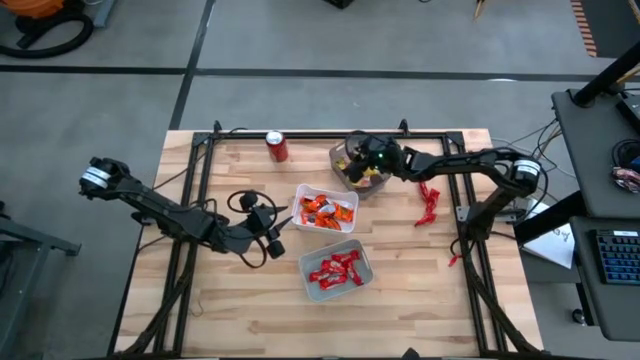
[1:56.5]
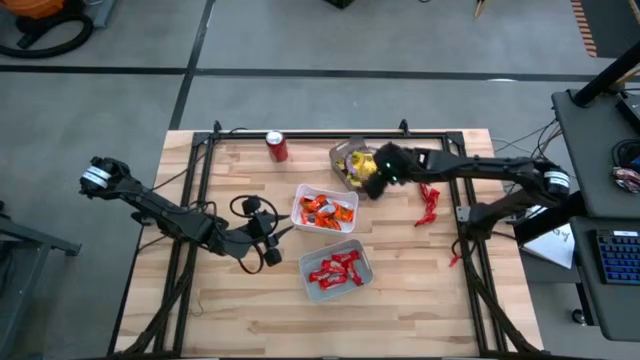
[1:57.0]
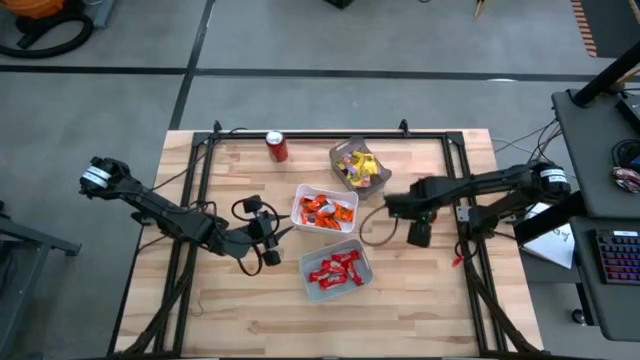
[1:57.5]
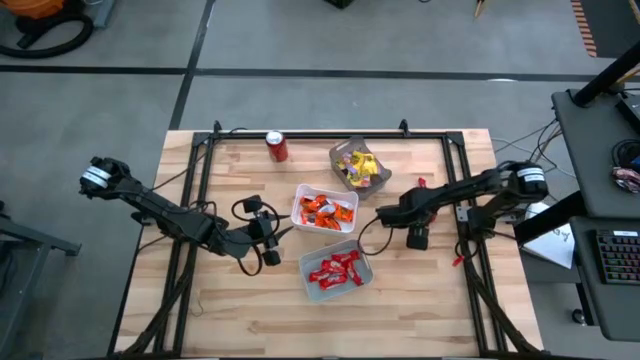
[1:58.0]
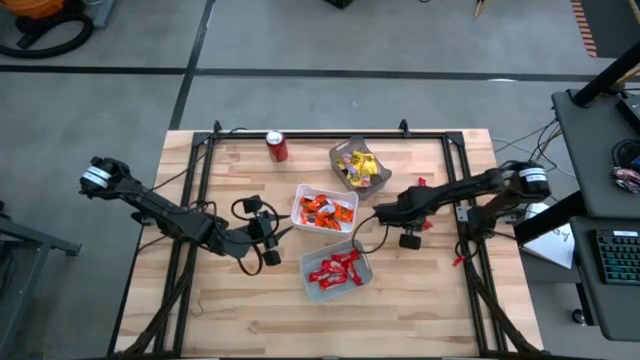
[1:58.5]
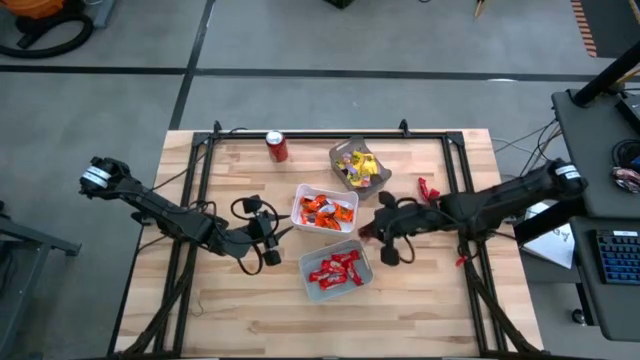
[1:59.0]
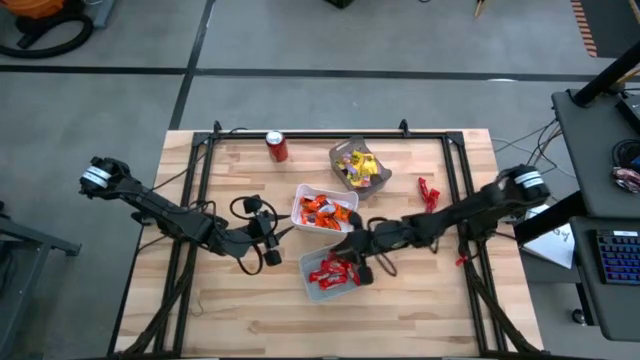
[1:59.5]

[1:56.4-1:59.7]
Task: Sort candy
Put the red chocolate pack into the gray bin

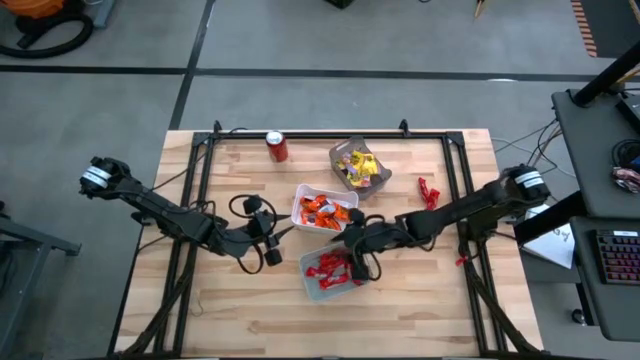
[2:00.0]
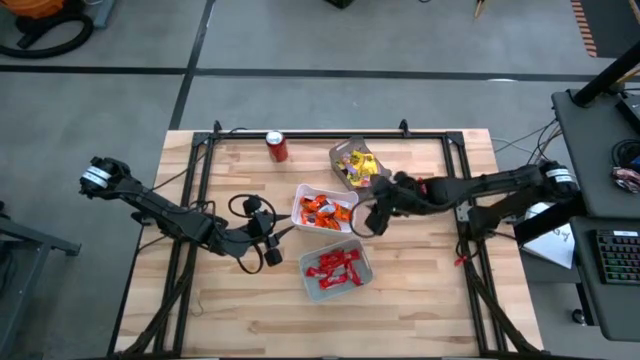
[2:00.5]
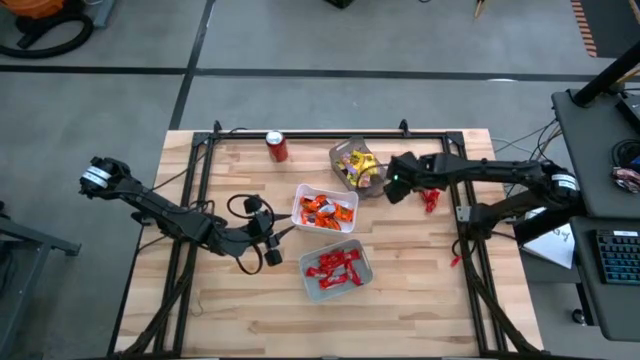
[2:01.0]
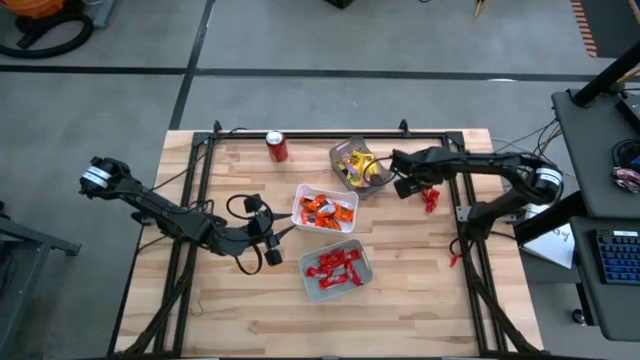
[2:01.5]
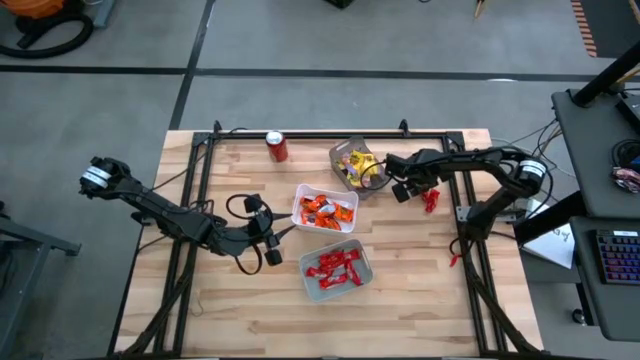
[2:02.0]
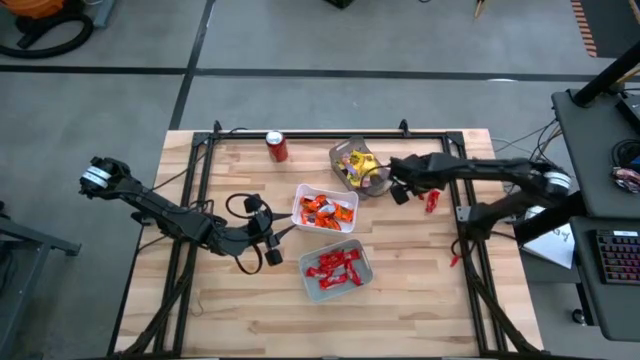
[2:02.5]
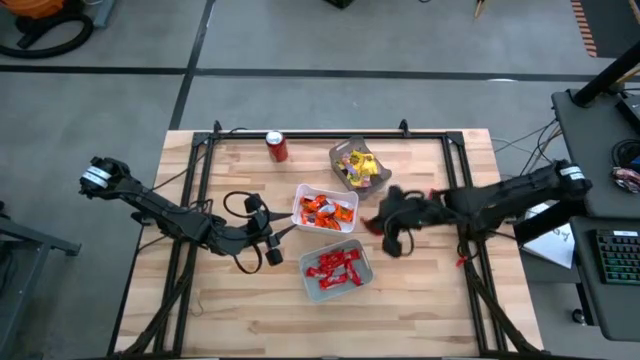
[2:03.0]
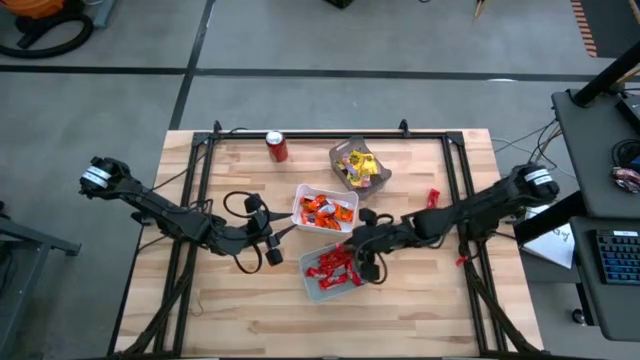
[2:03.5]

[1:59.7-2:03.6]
Put the red chocolate pack into the gray bin

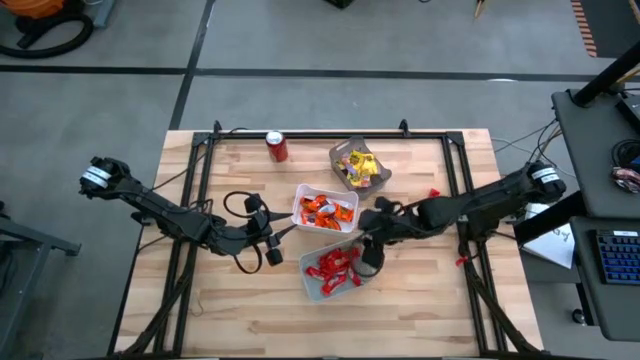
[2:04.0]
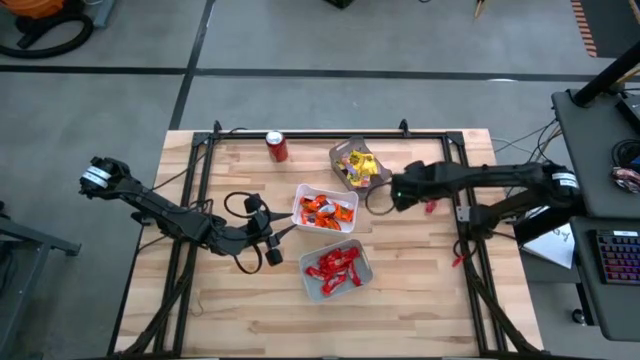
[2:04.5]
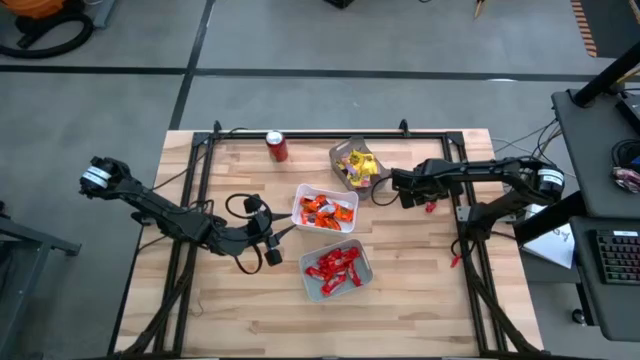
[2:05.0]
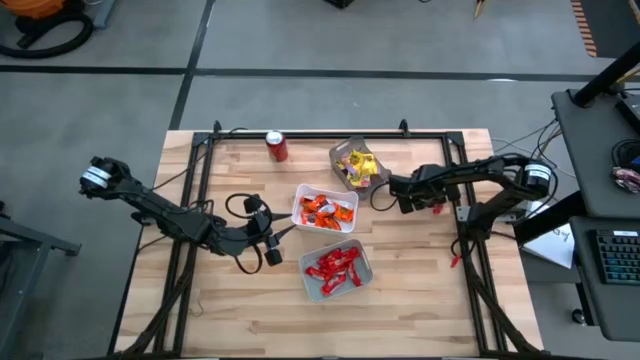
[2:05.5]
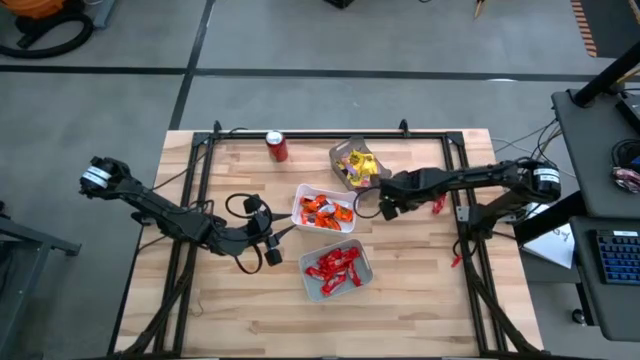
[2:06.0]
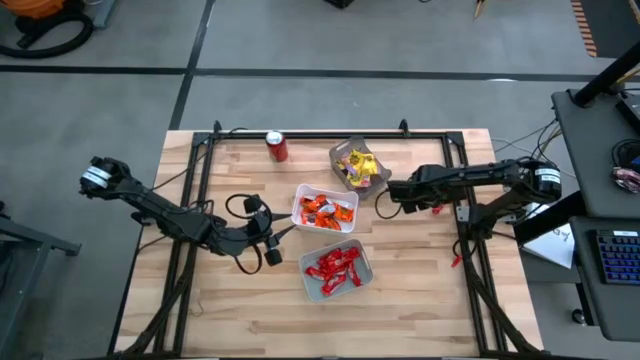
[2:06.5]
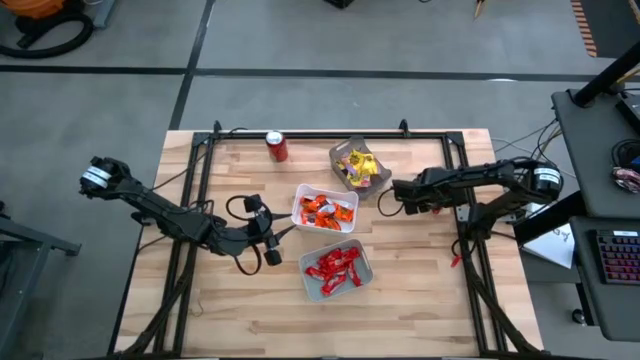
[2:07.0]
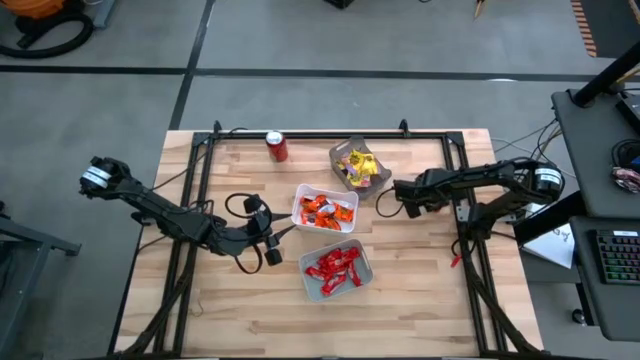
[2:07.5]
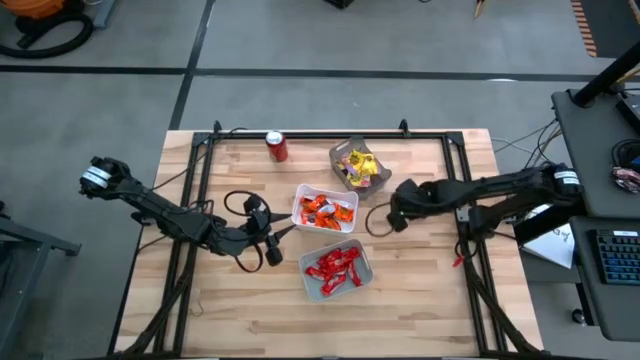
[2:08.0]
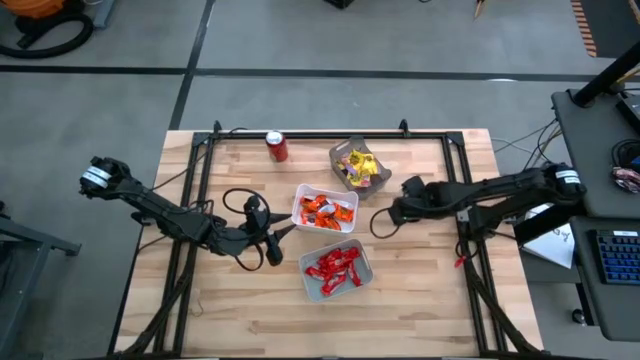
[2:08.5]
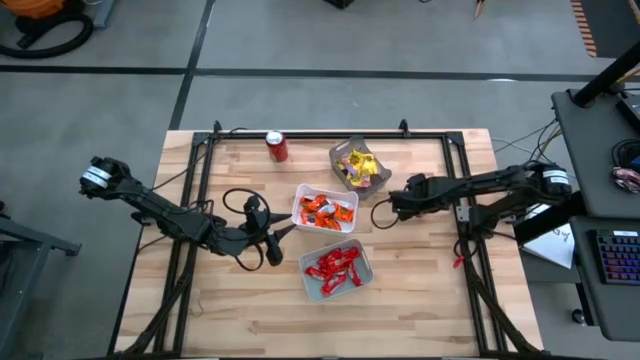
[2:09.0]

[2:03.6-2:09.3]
Put the red chocolate pack into the gray bin

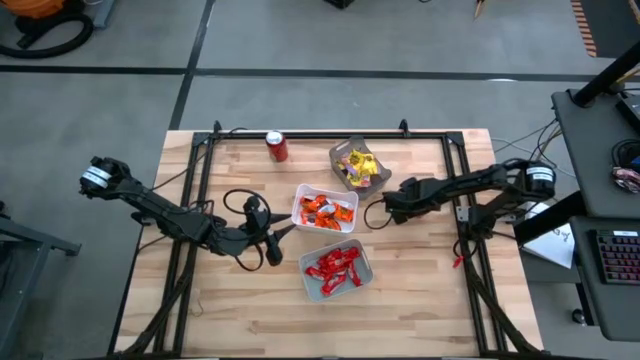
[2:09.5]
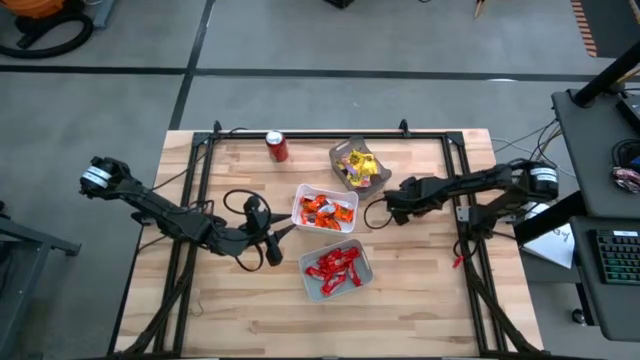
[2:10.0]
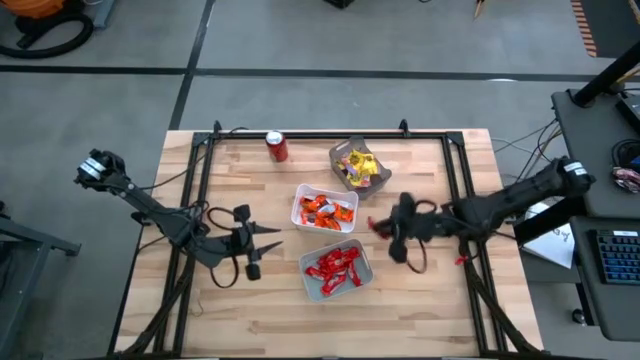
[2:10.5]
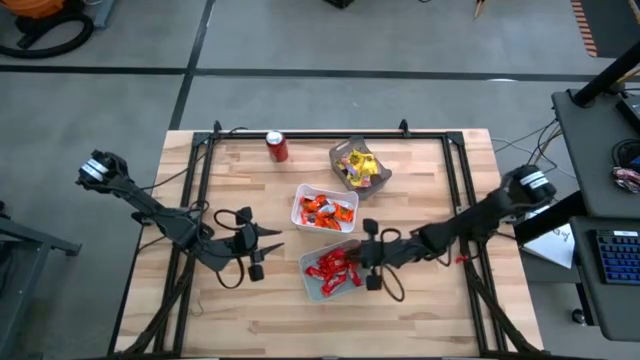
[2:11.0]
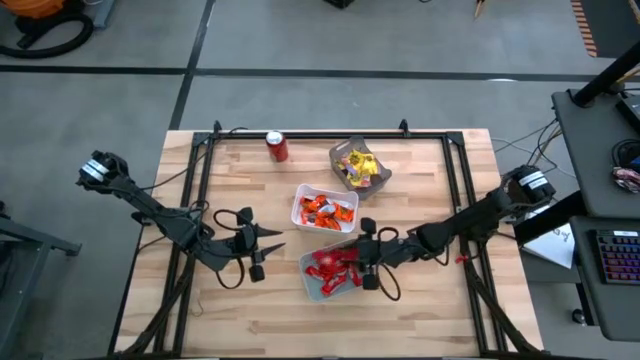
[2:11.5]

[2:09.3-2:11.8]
Put the red chocolate pack into the gray bin

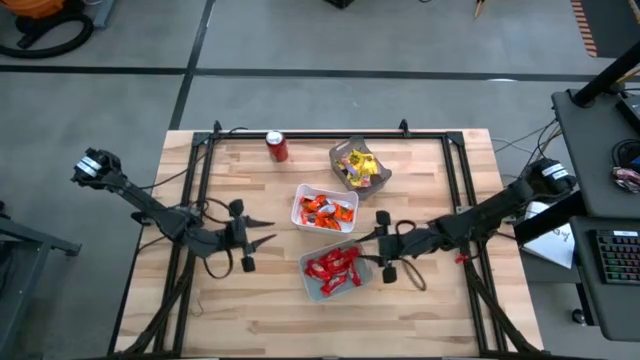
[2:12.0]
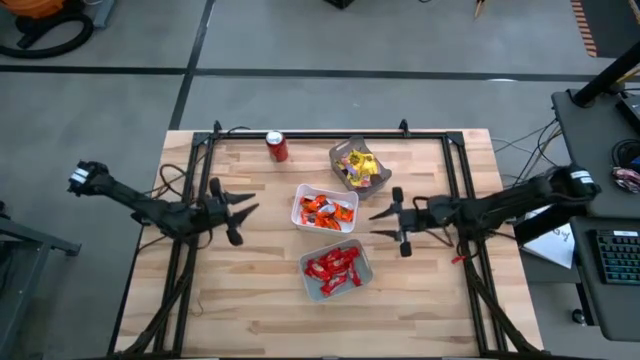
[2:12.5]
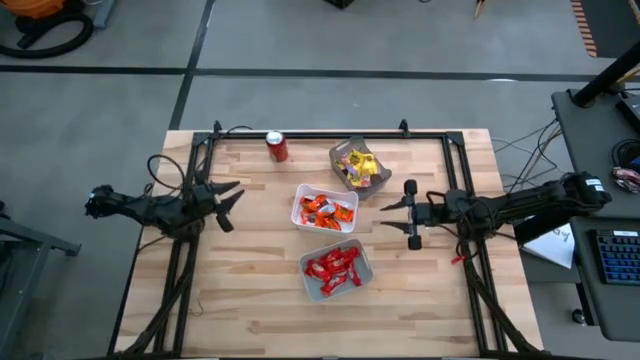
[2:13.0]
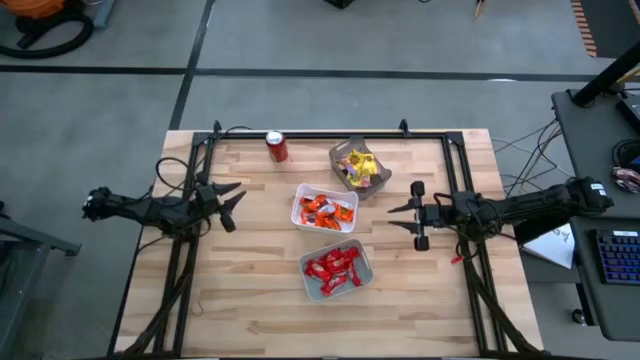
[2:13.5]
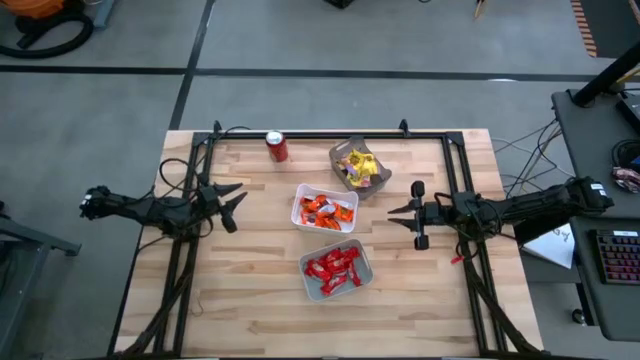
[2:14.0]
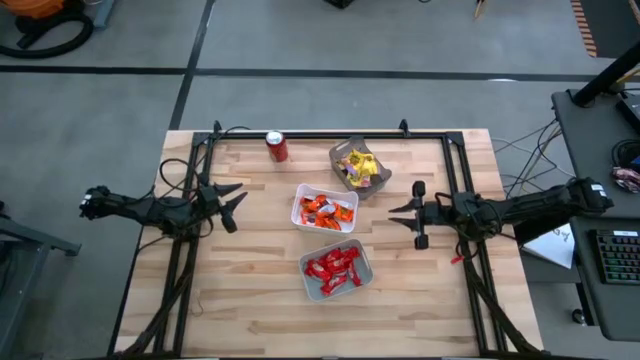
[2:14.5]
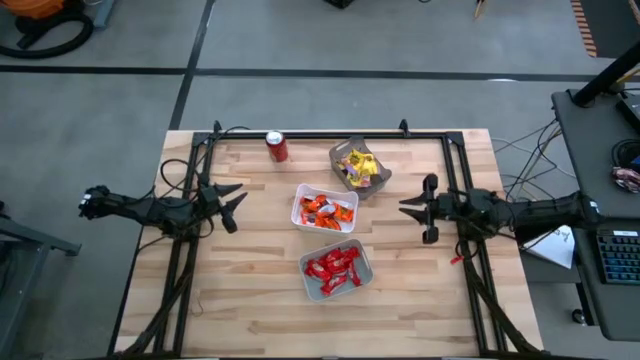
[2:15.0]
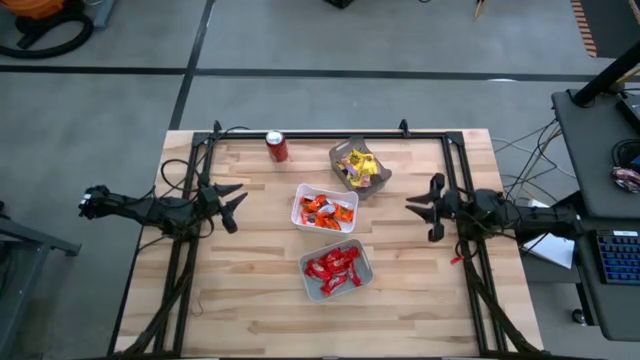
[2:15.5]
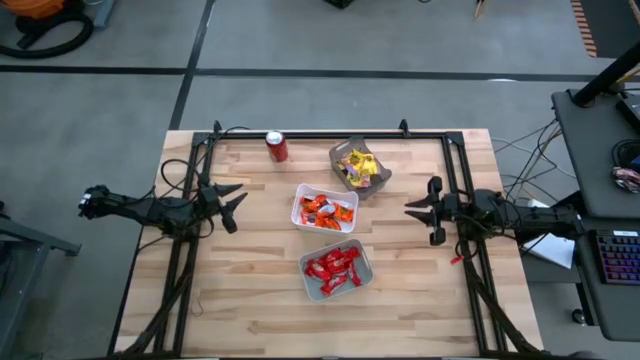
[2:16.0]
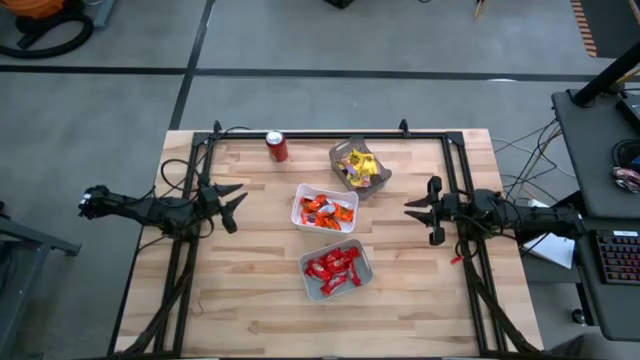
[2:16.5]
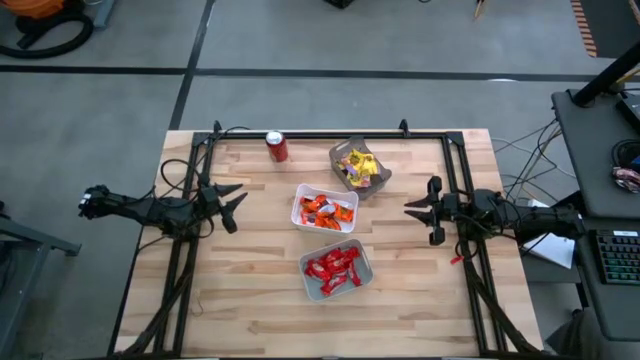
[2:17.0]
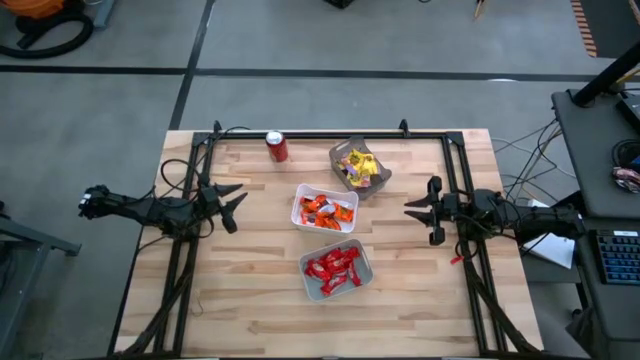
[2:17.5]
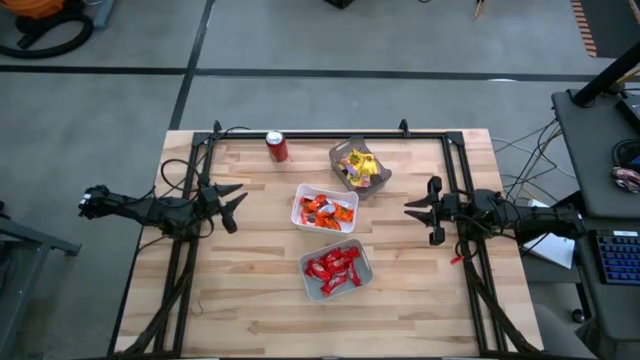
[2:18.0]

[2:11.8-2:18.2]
Return to Home Position
